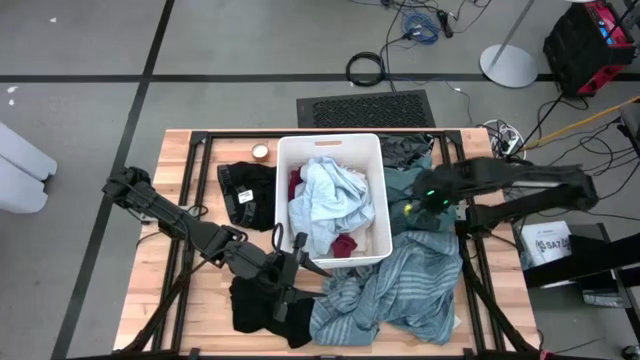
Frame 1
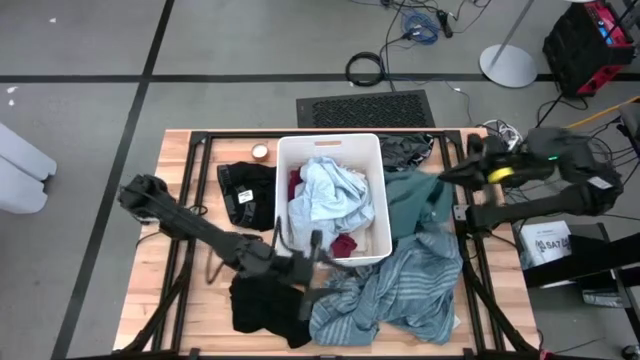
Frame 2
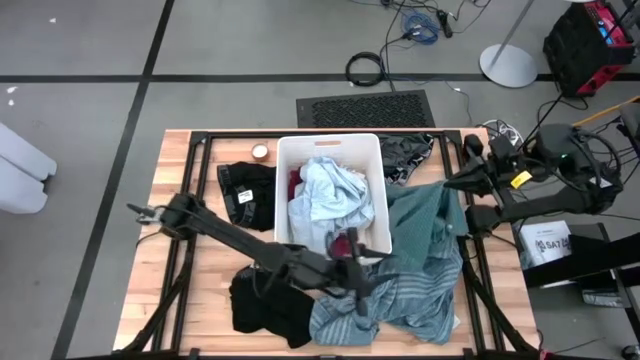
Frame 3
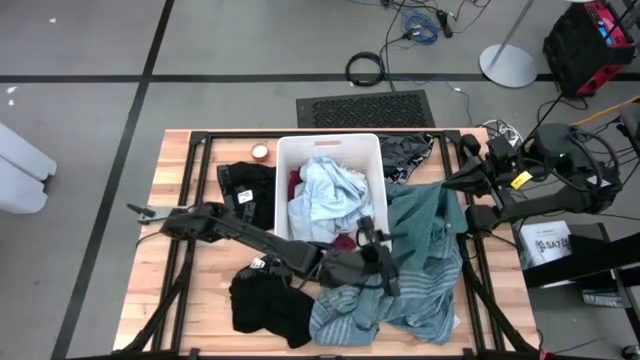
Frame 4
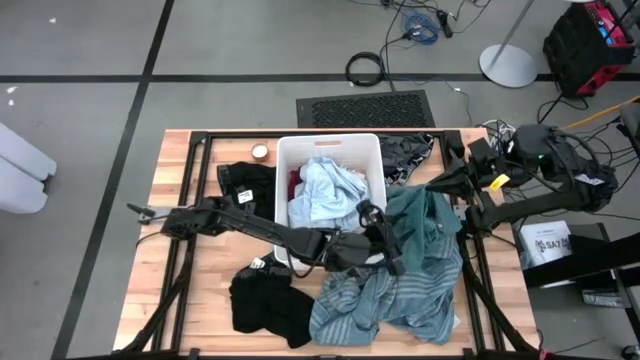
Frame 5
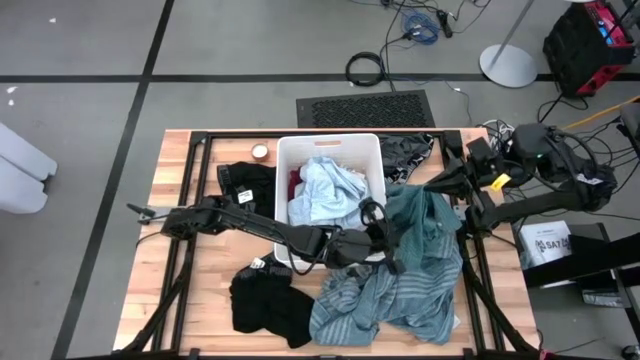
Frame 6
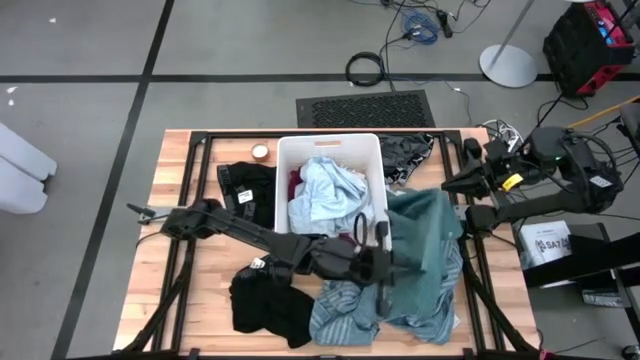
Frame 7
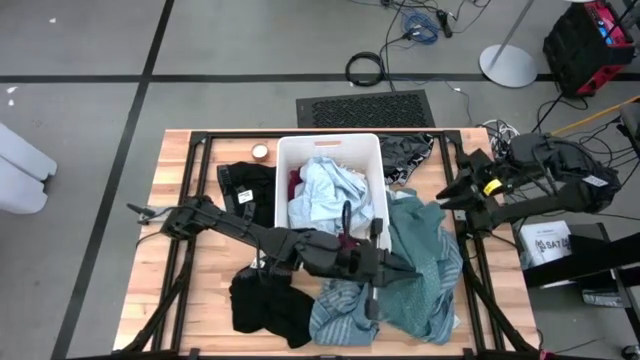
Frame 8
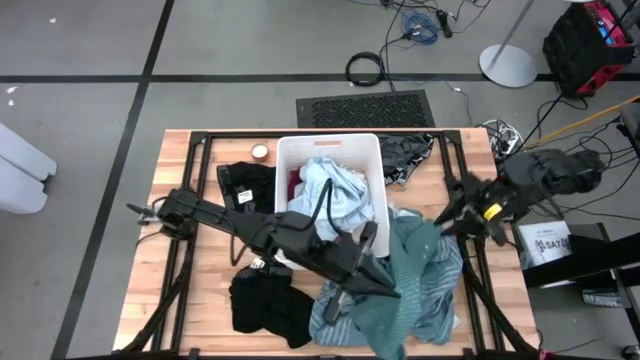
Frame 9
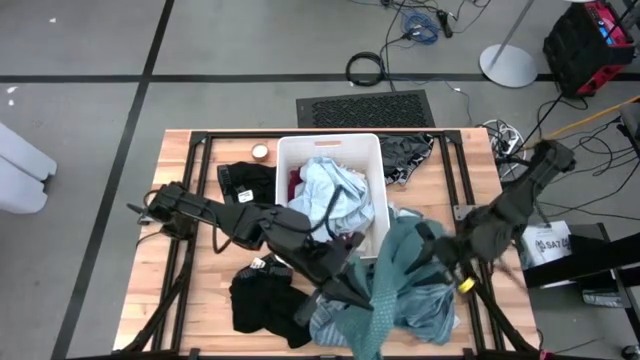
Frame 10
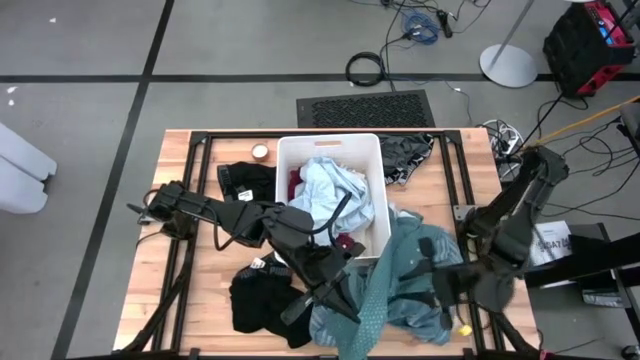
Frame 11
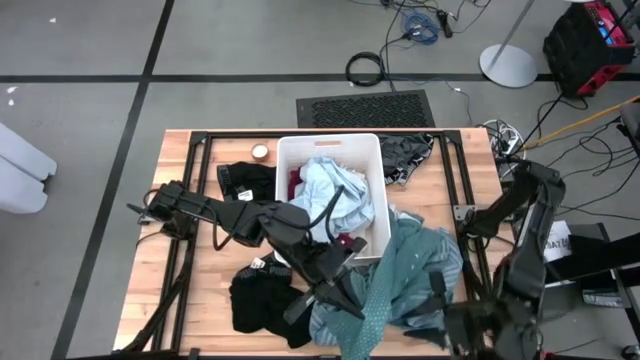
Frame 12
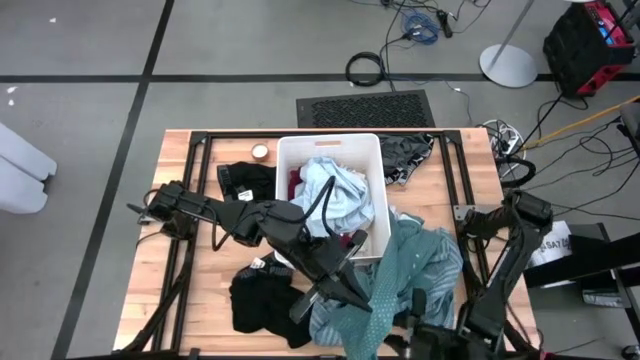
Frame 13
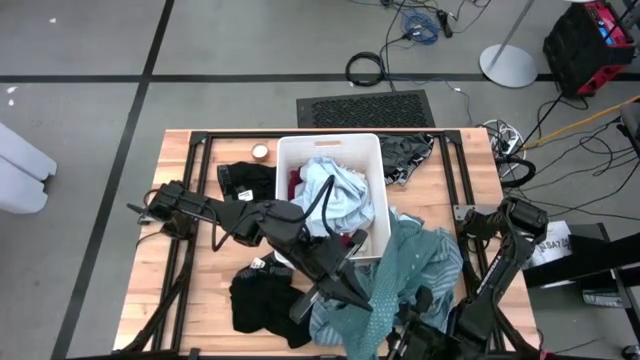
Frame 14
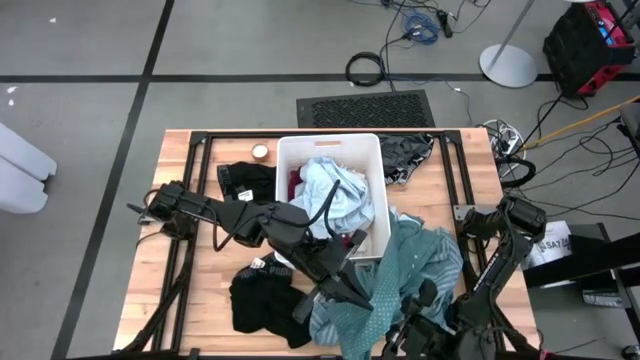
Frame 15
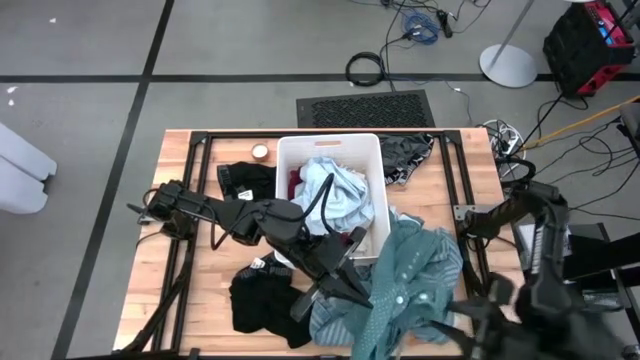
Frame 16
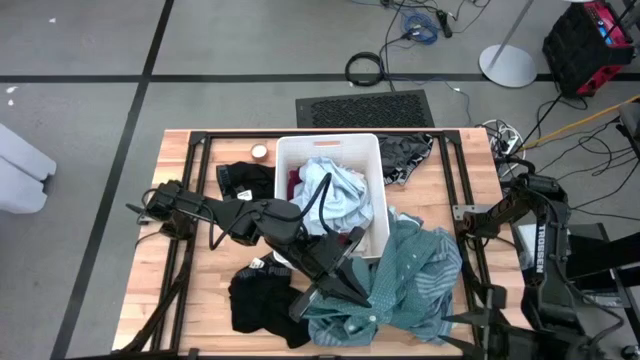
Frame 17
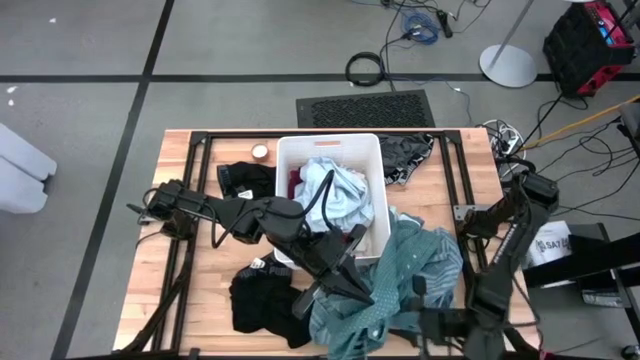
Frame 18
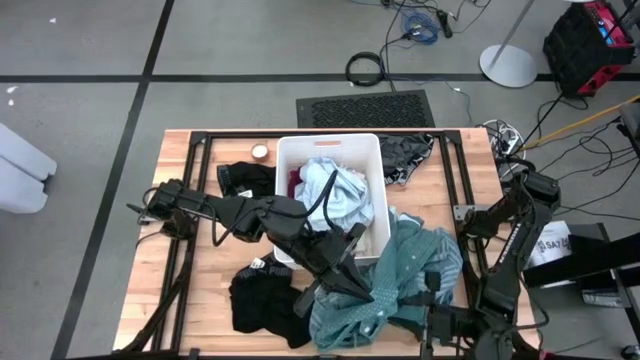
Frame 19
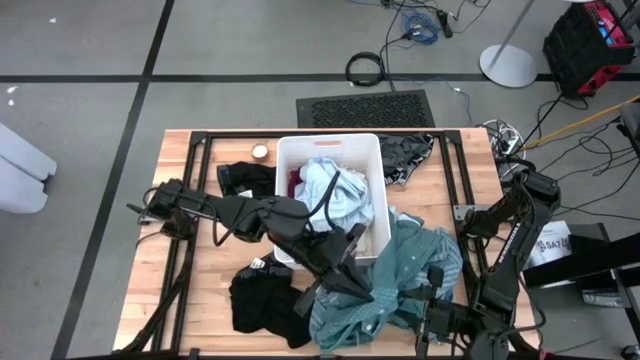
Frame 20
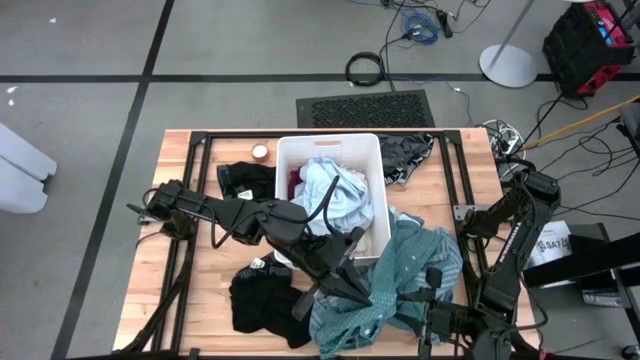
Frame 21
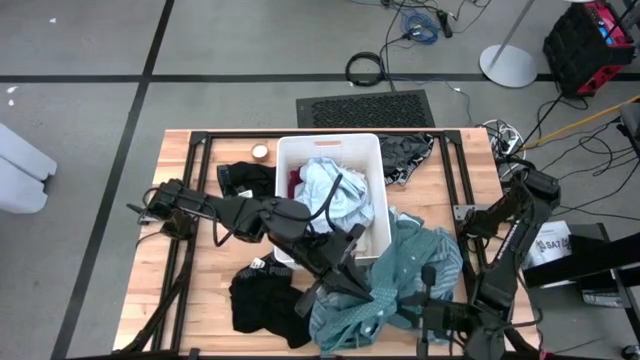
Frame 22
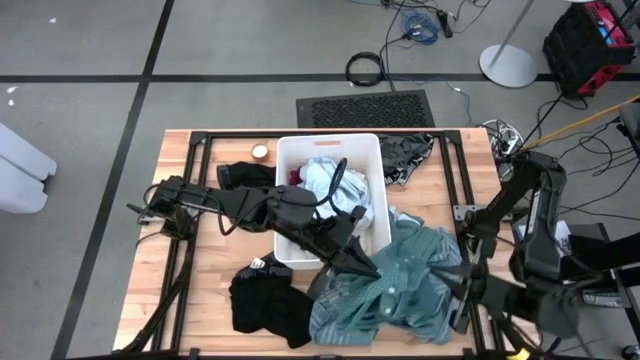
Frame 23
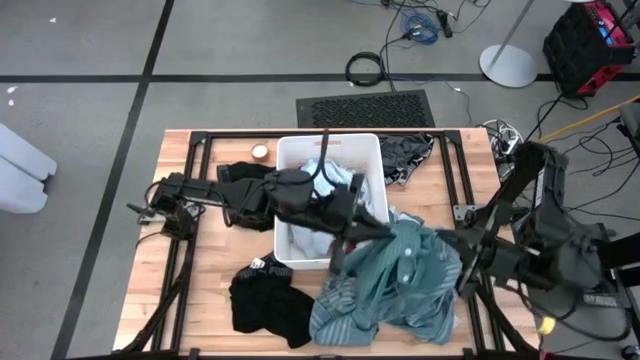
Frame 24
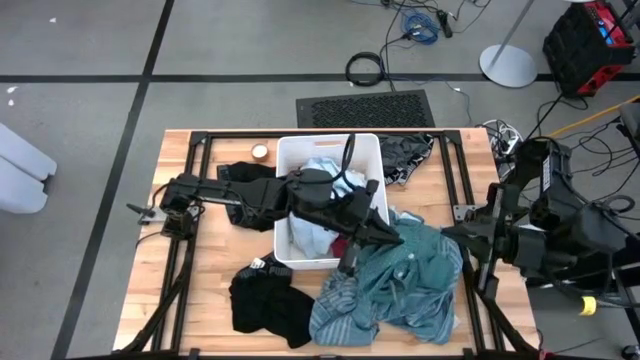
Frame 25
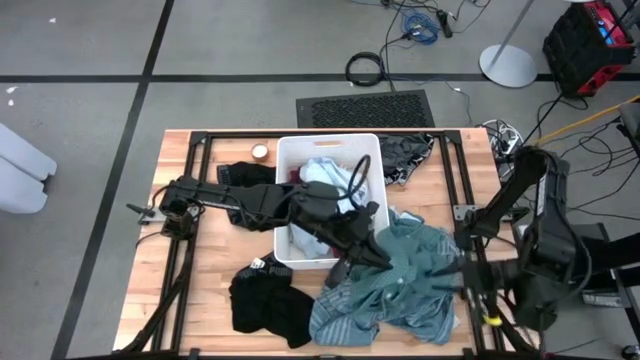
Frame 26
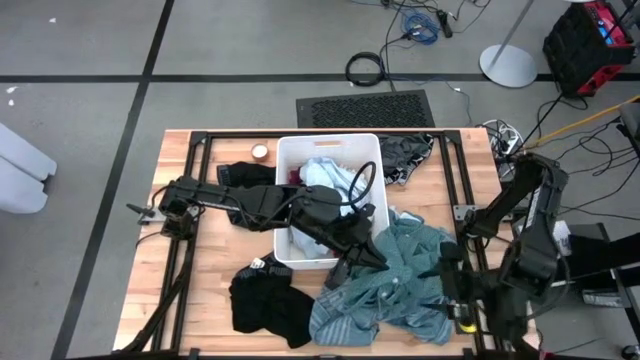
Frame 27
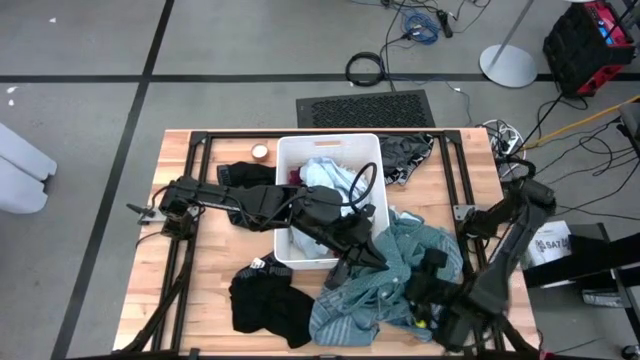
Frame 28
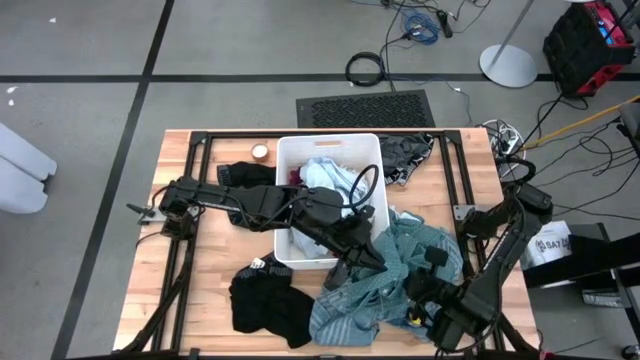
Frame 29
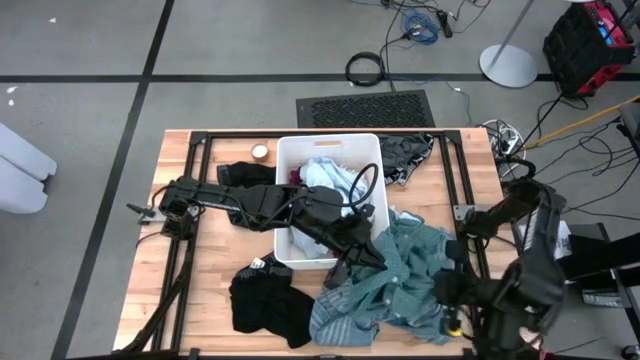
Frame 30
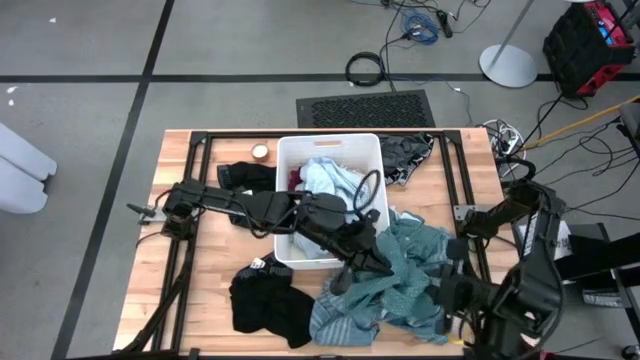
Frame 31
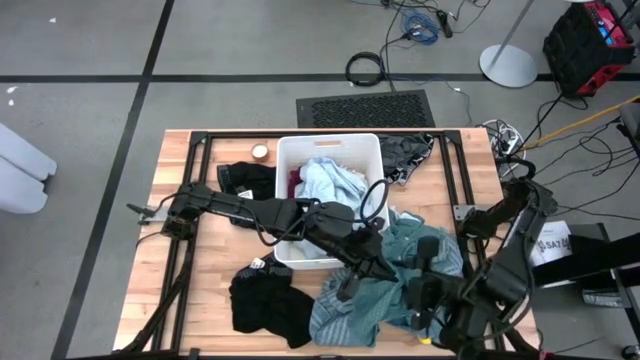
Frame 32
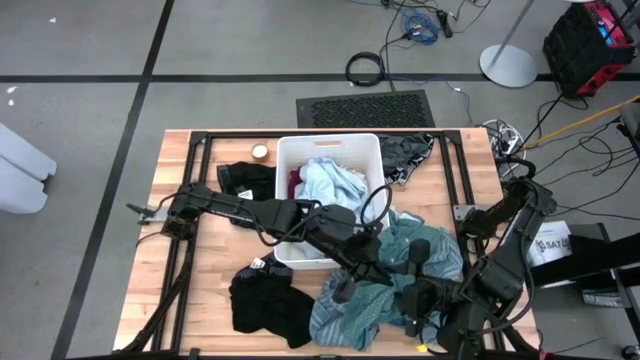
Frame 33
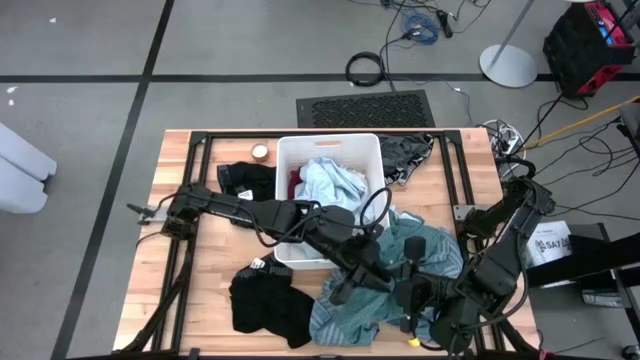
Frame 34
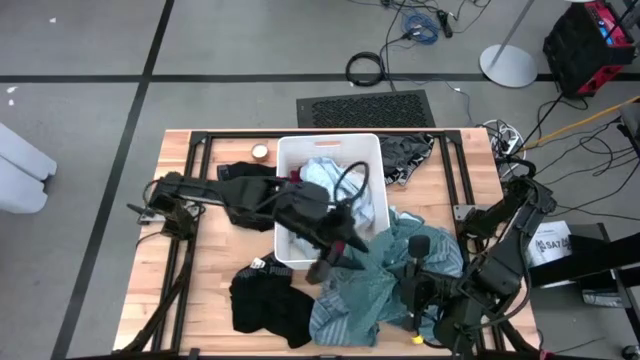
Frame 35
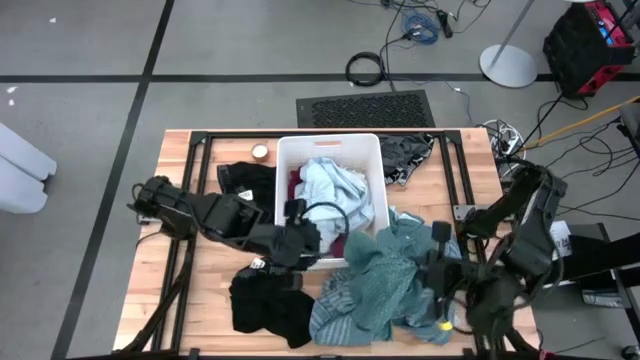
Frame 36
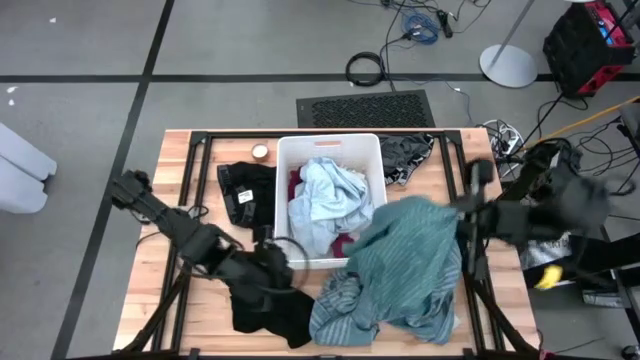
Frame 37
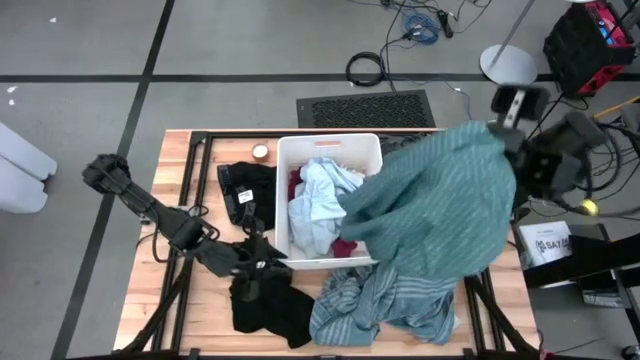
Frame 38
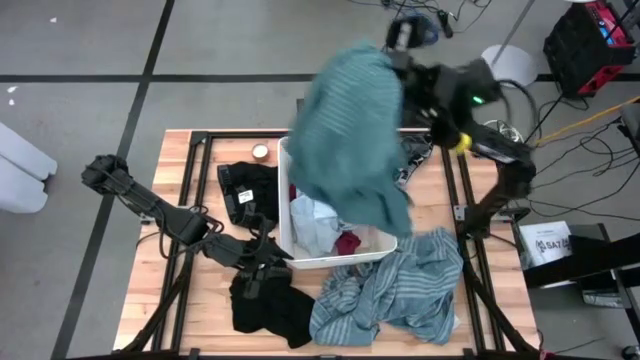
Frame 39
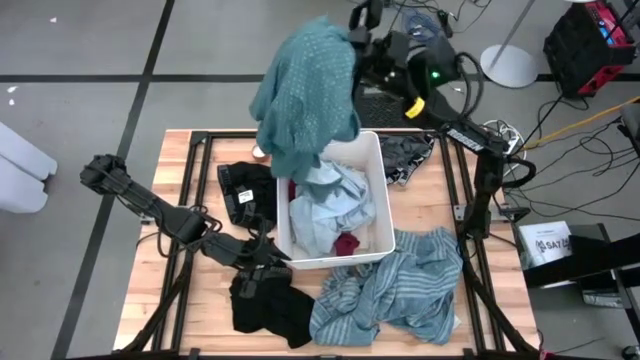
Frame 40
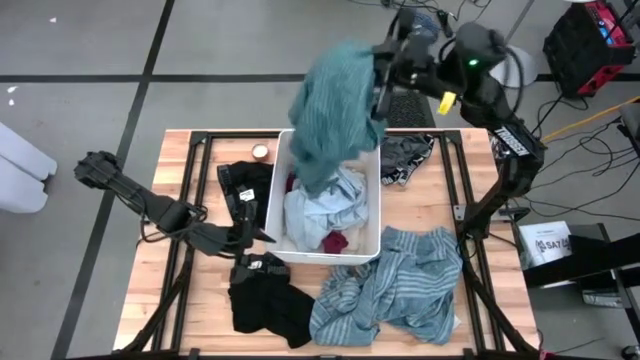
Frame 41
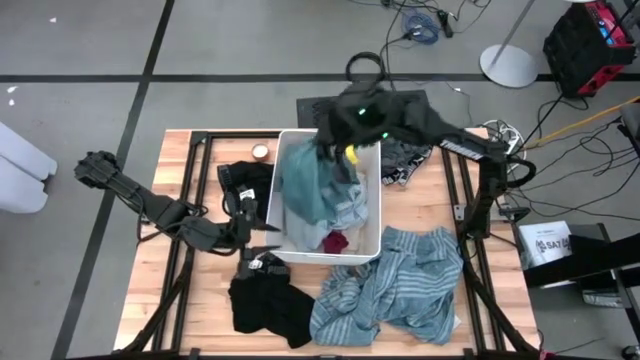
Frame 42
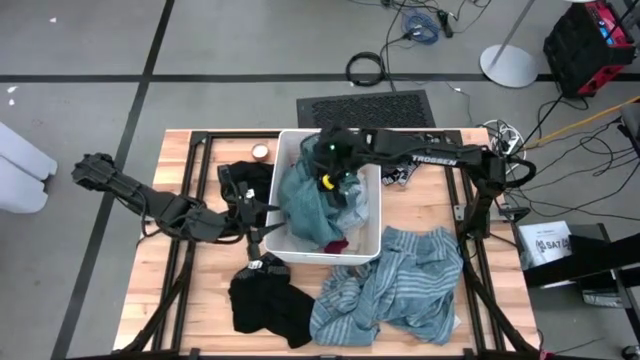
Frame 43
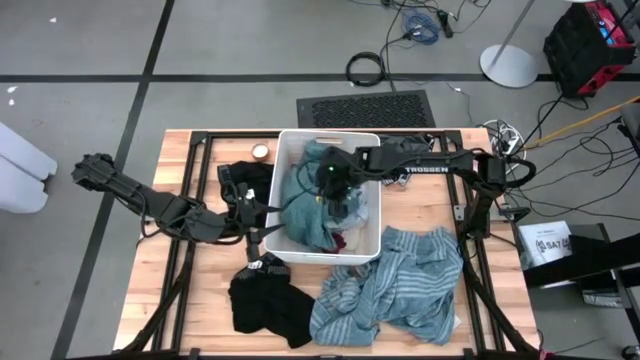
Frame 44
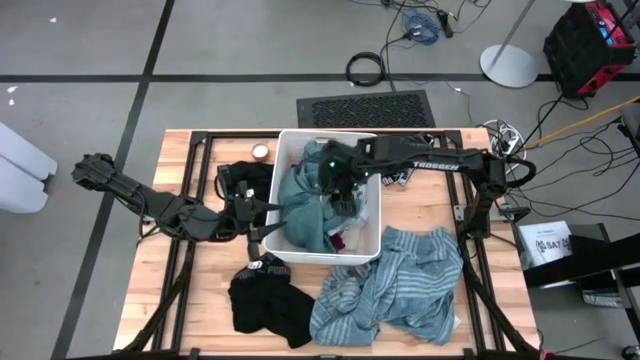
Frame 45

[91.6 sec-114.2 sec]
Task: Sort clothes
Put the green patterned shirt into the laundry bin
